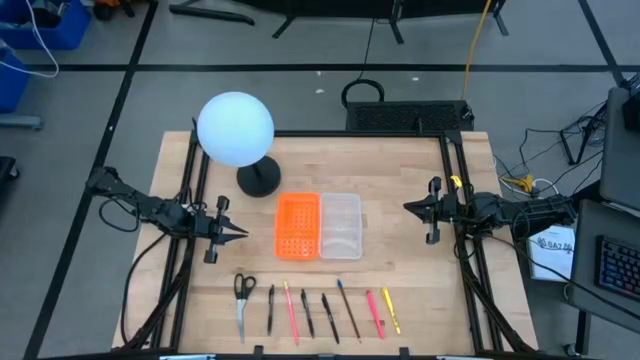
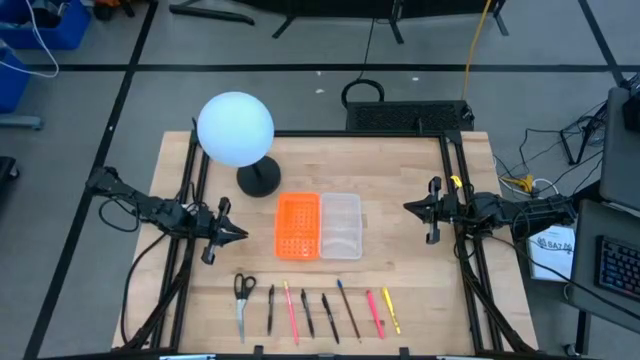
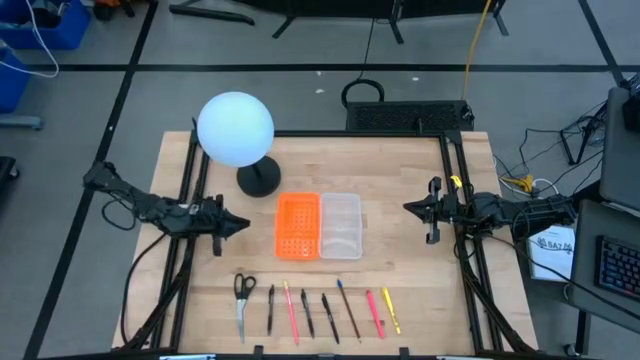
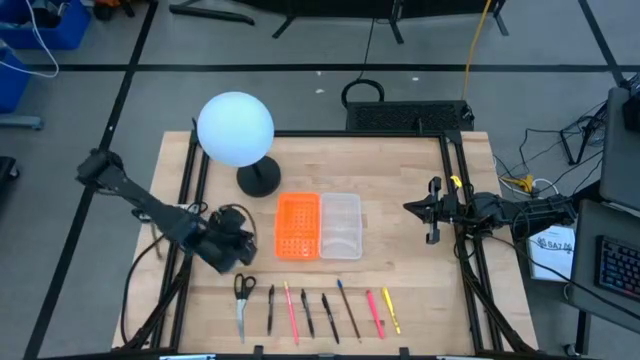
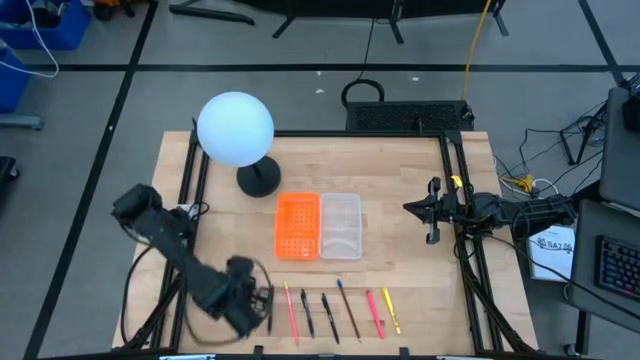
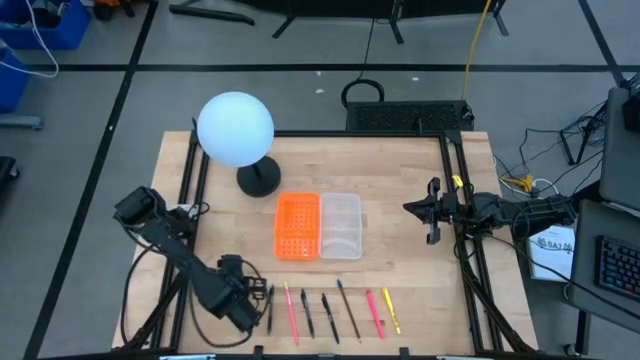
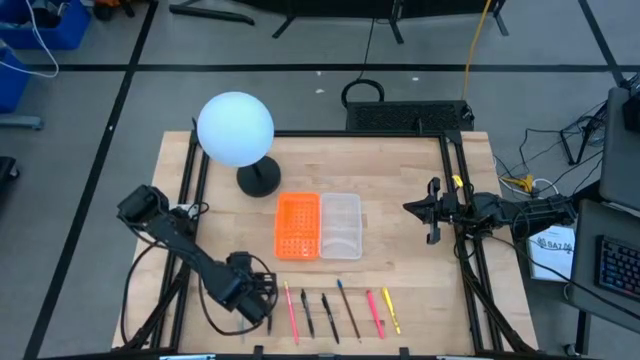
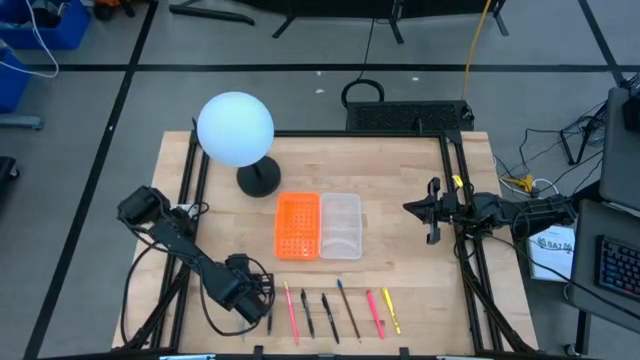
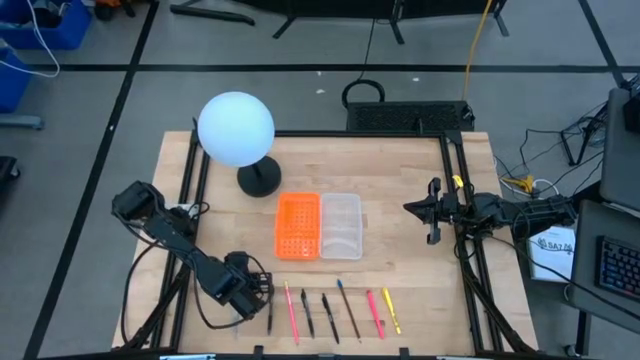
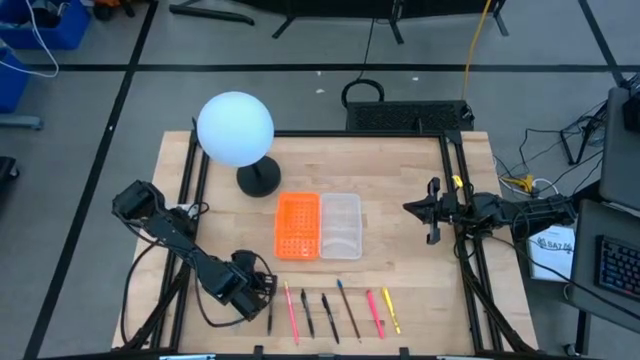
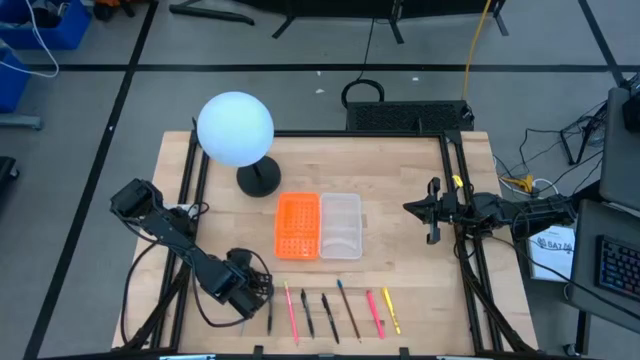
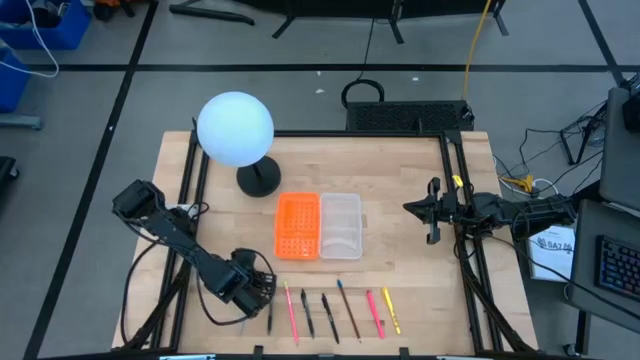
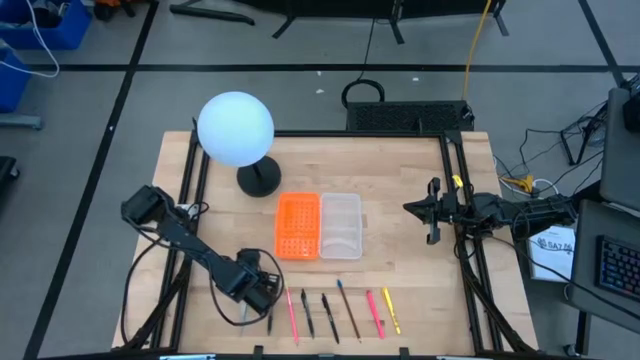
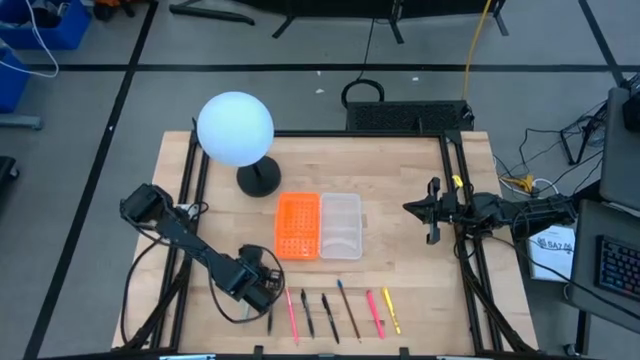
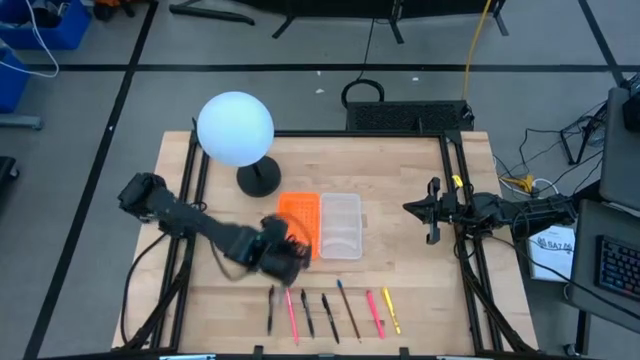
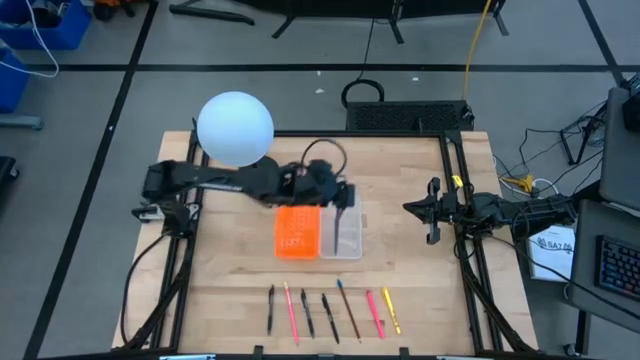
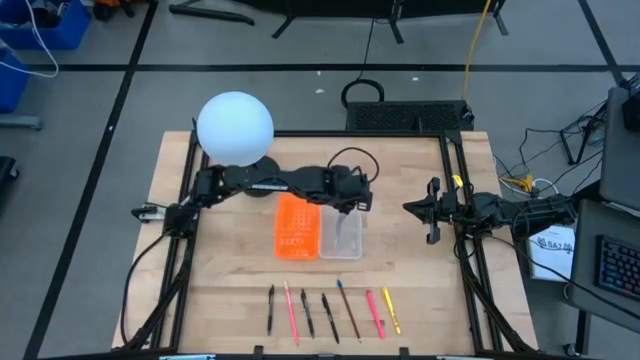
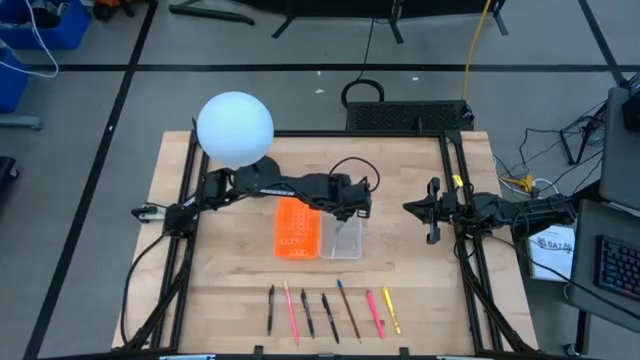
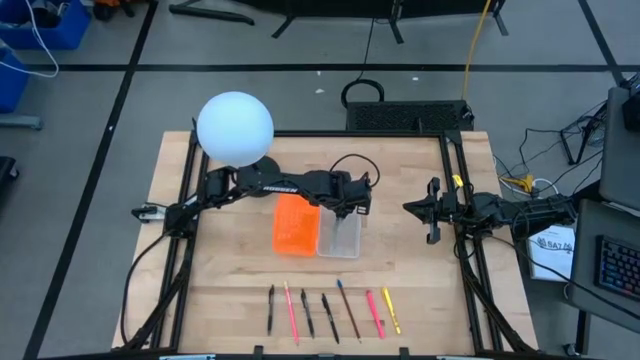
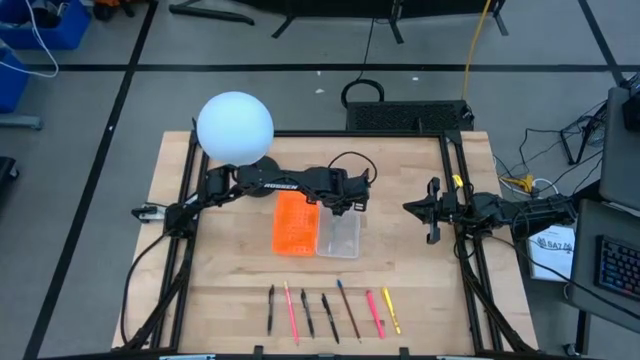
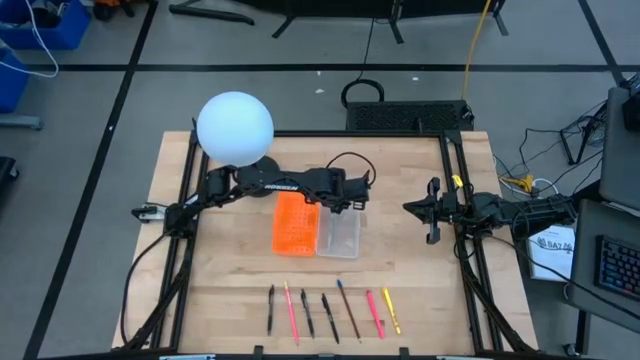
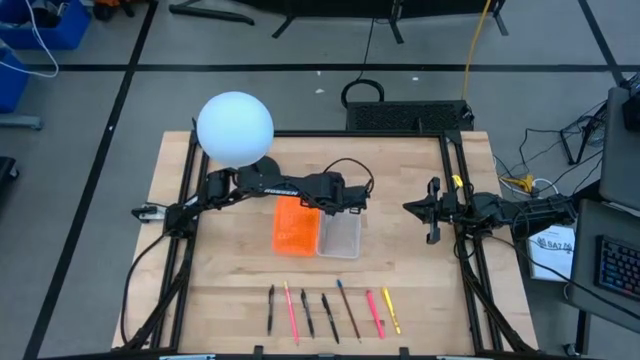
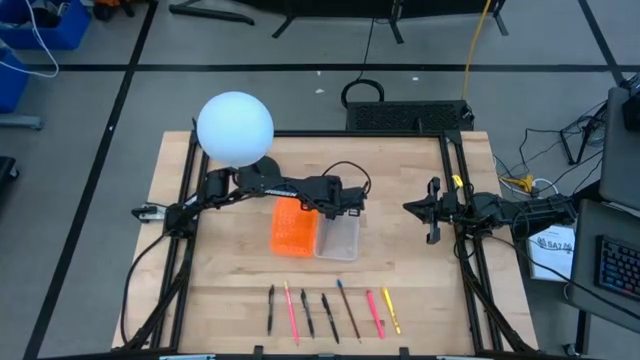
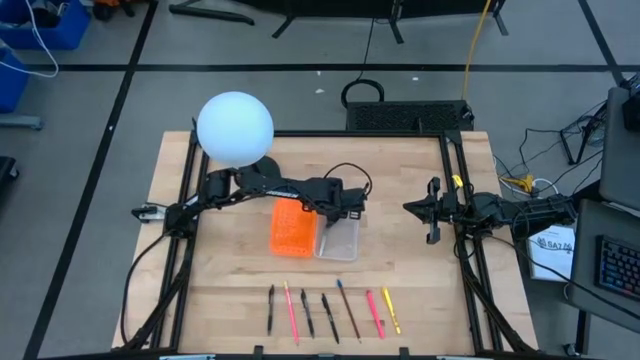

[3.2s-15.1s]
Task: Pick & place school supplies into a supply box
Put the black scissors into the orange supply box

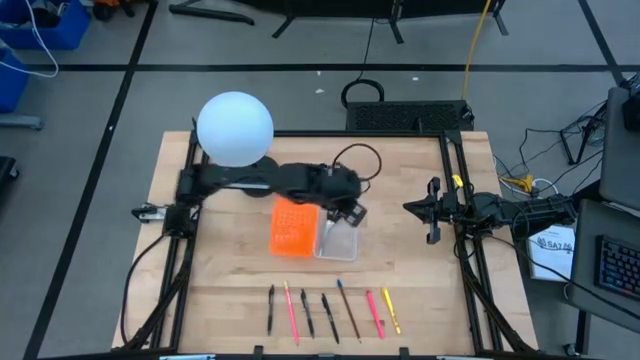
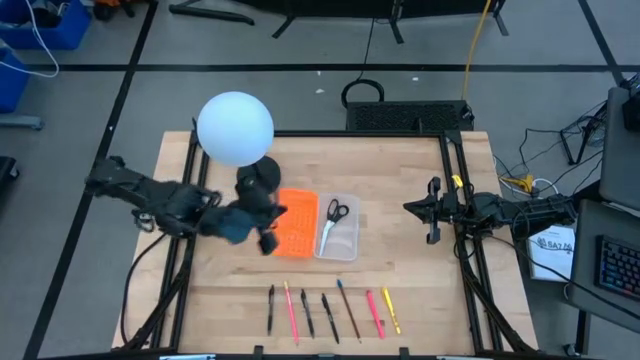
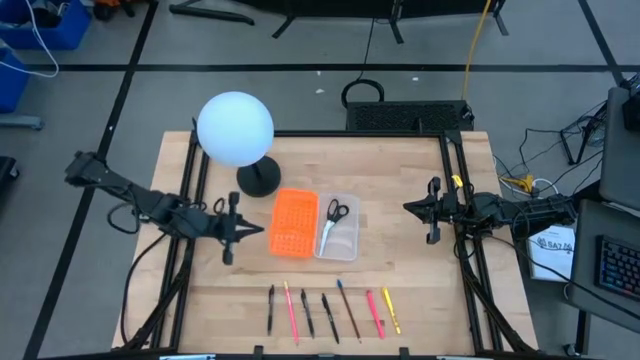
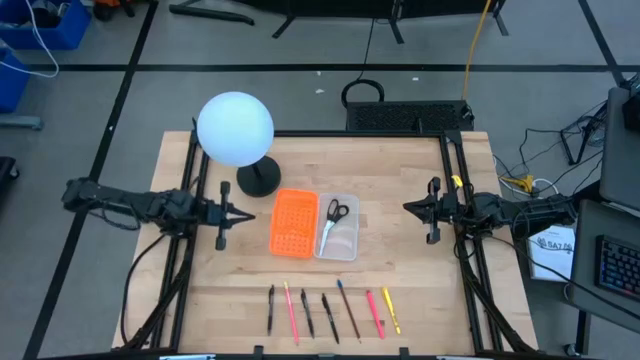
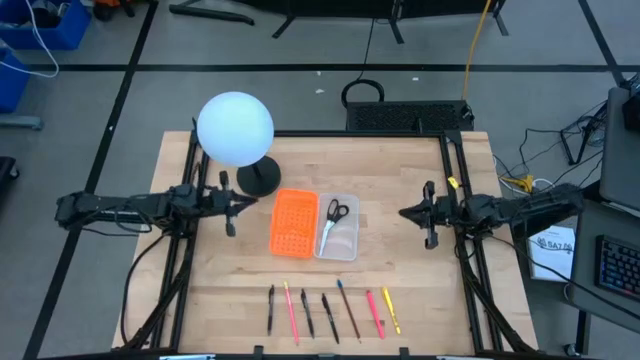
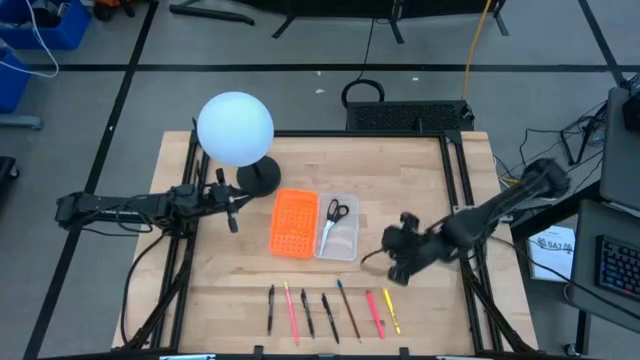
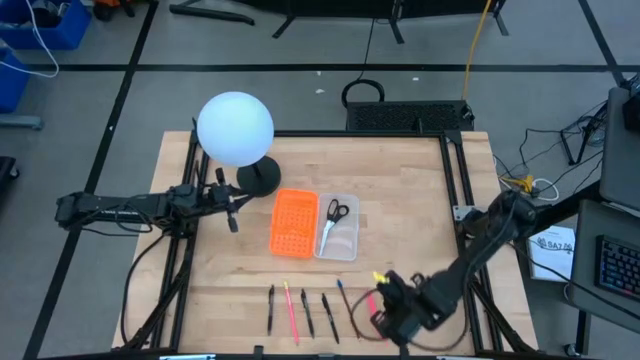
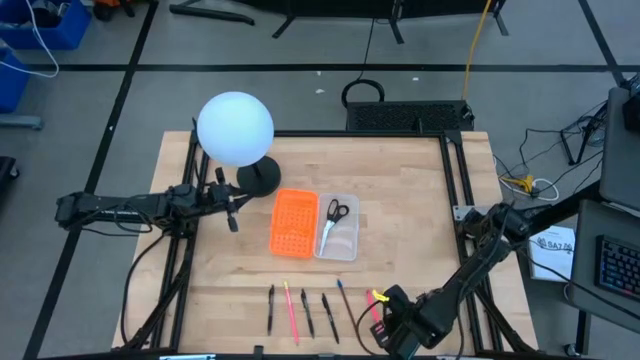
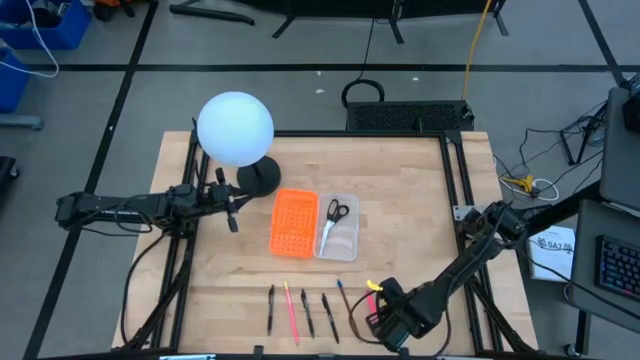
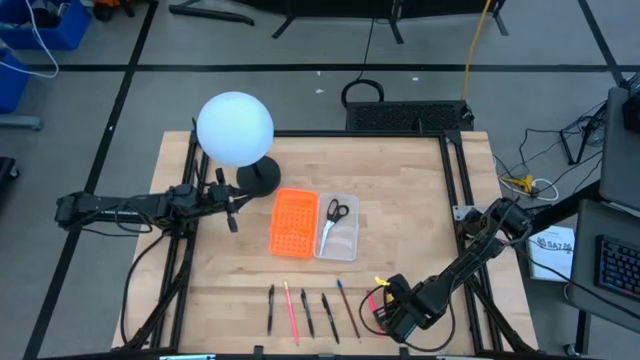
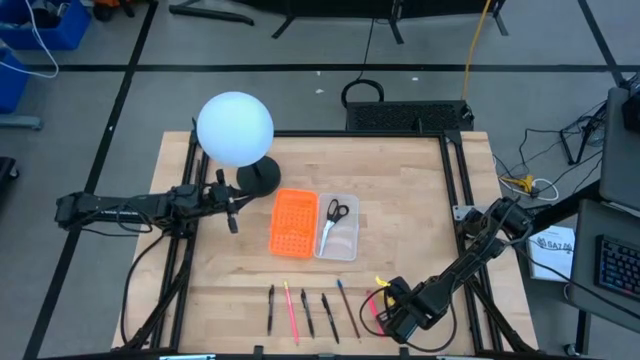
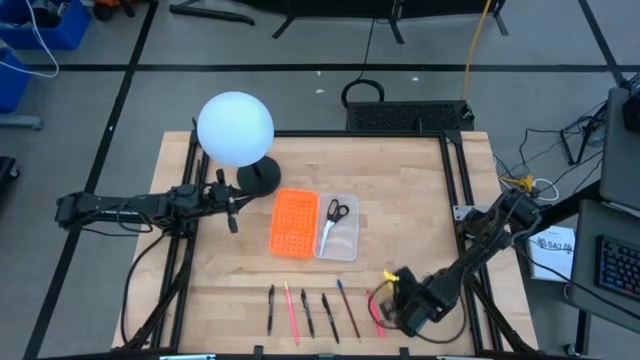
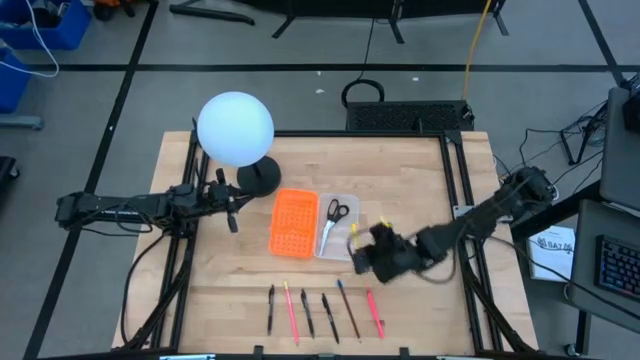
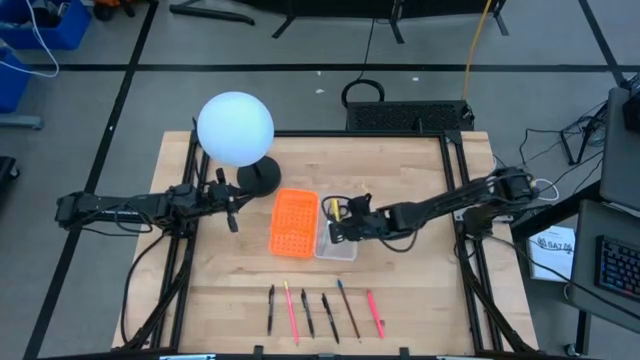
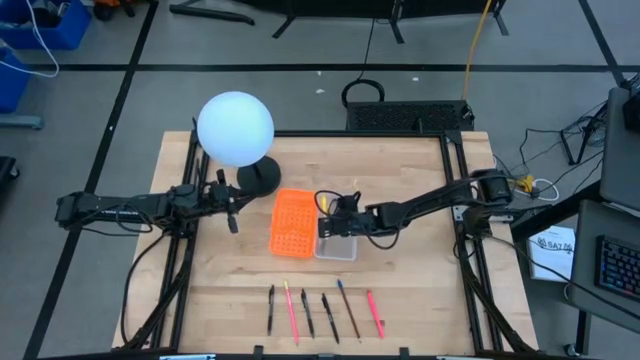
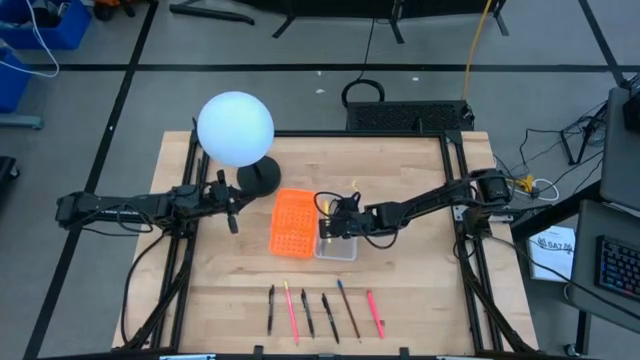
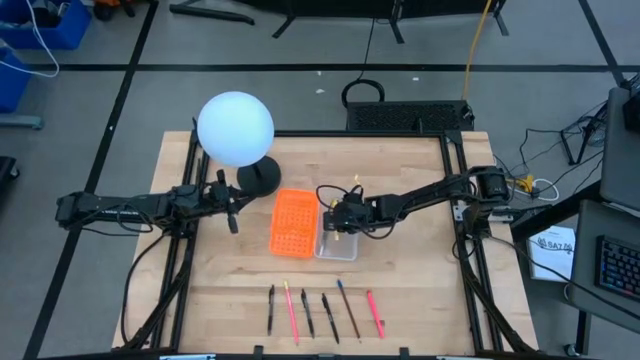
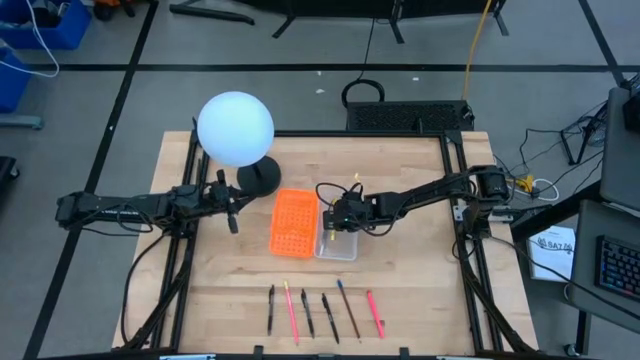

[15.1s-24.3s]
Put the yellow pen into the orange supply box

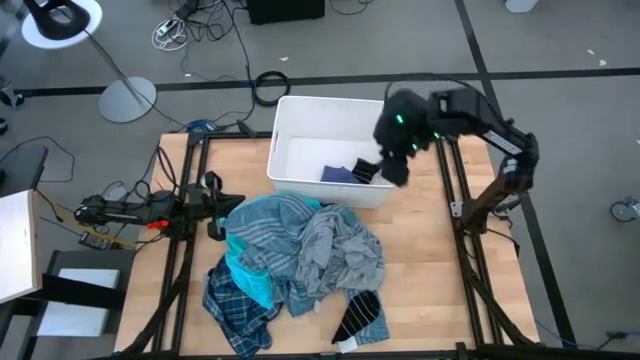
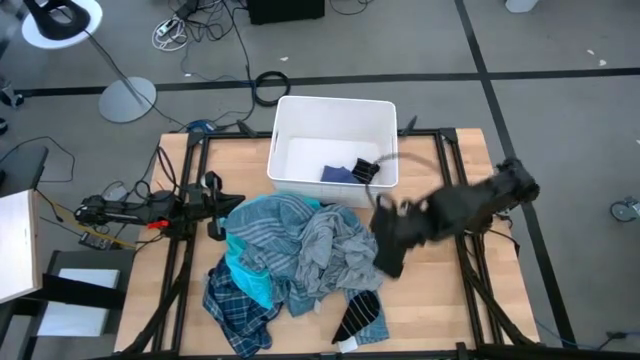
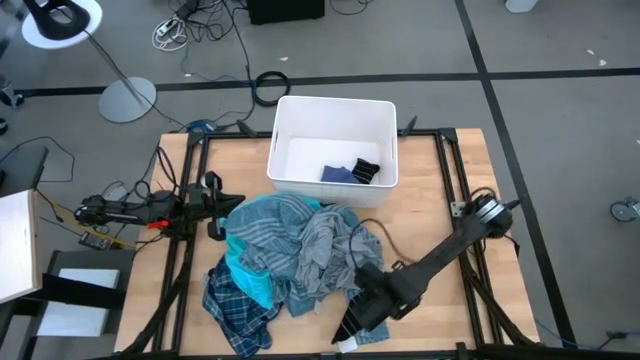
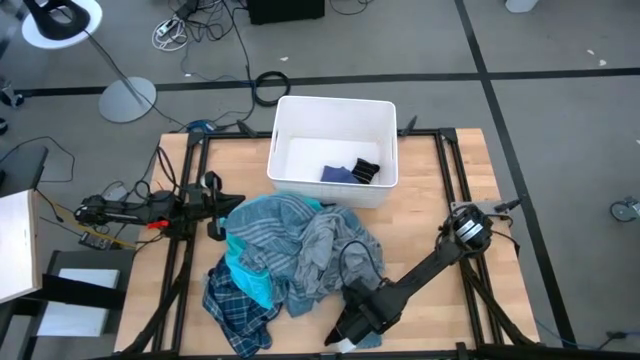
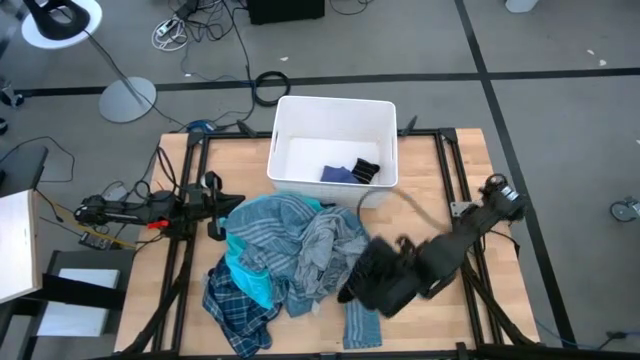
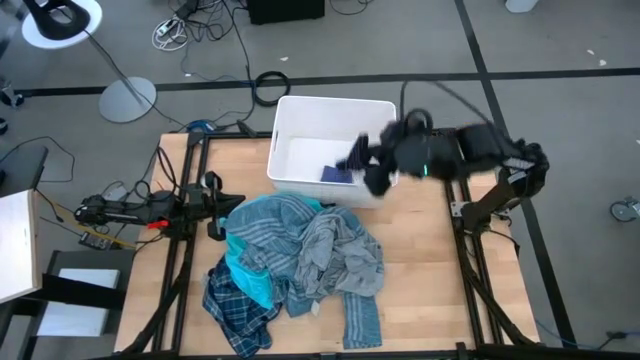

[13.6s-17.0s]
Task: Sort clothes
Put the black sock into the white bin
